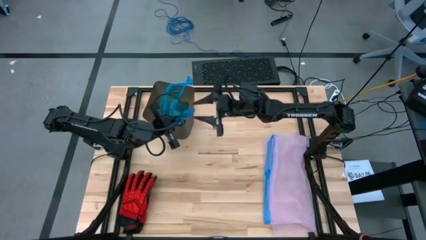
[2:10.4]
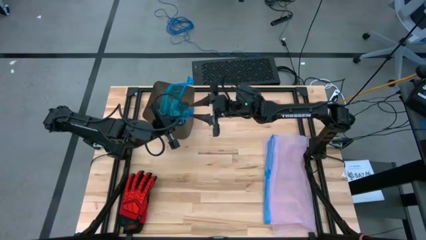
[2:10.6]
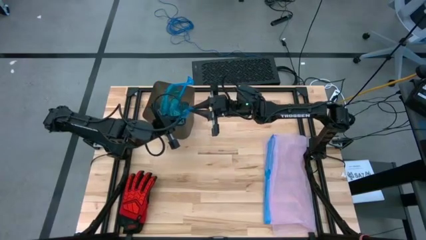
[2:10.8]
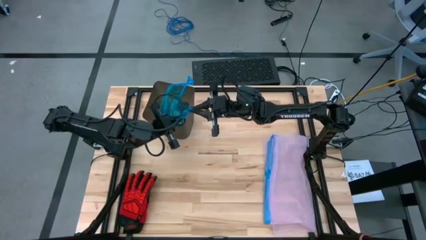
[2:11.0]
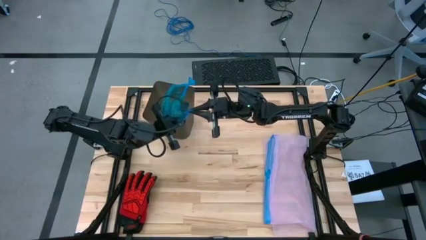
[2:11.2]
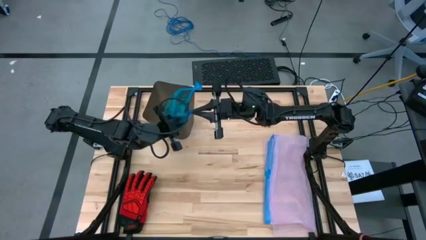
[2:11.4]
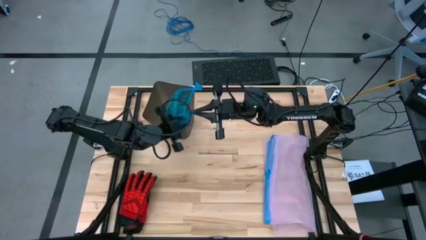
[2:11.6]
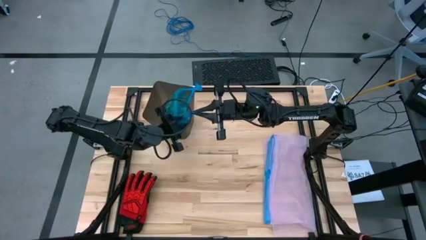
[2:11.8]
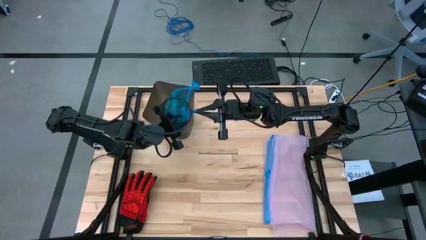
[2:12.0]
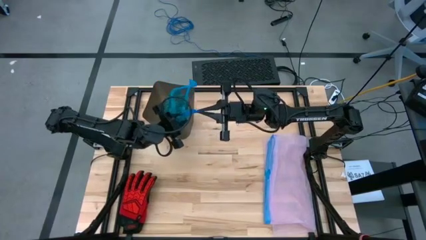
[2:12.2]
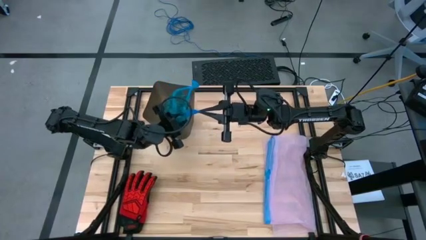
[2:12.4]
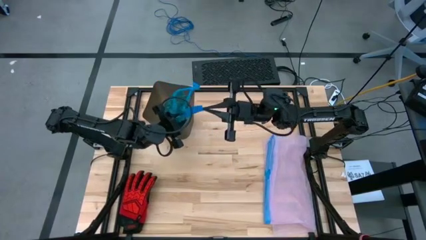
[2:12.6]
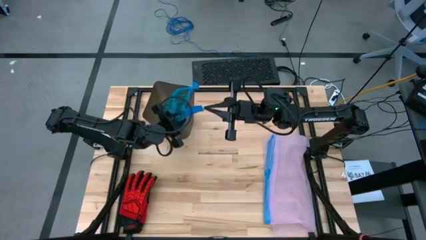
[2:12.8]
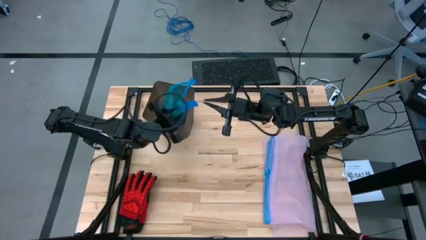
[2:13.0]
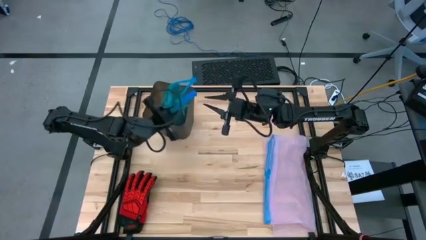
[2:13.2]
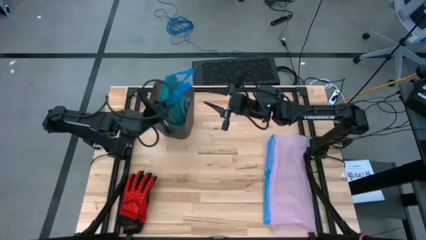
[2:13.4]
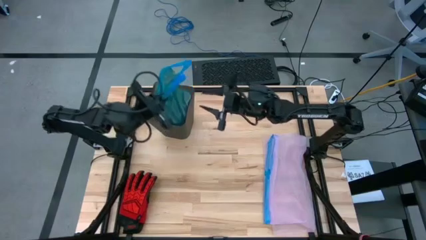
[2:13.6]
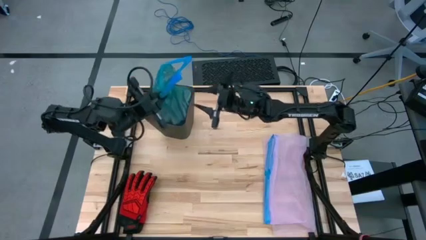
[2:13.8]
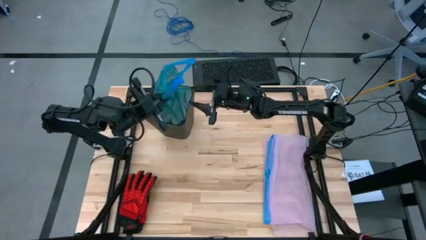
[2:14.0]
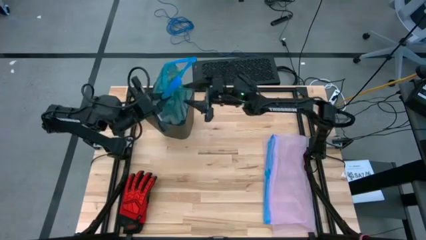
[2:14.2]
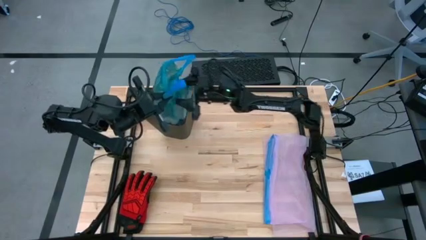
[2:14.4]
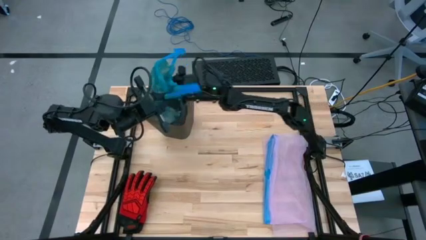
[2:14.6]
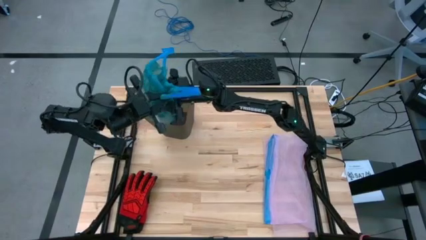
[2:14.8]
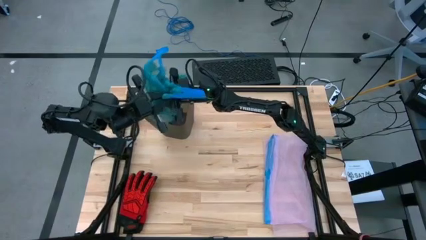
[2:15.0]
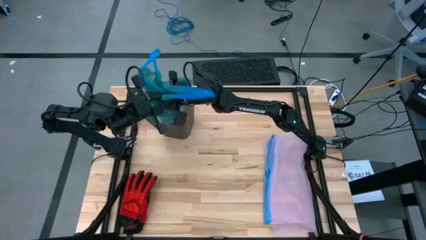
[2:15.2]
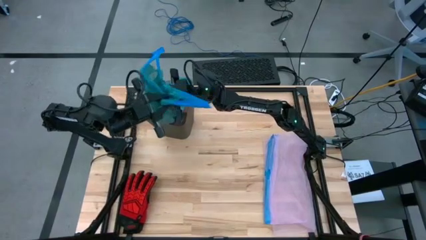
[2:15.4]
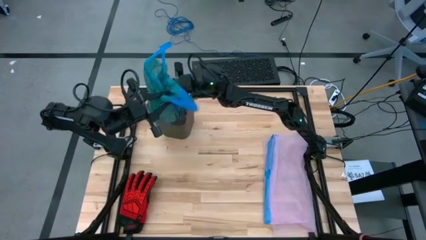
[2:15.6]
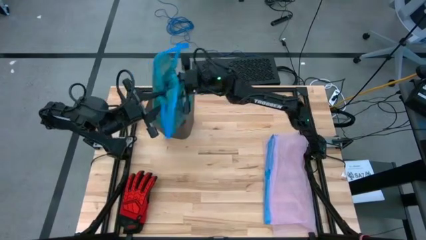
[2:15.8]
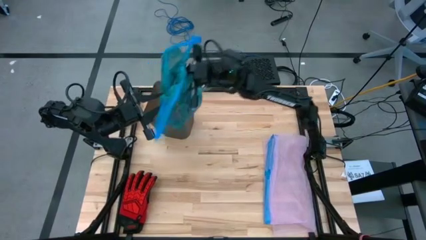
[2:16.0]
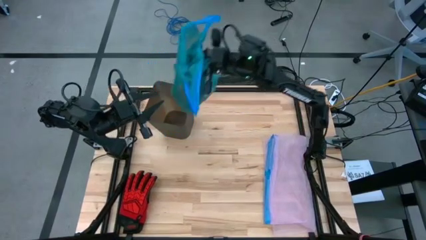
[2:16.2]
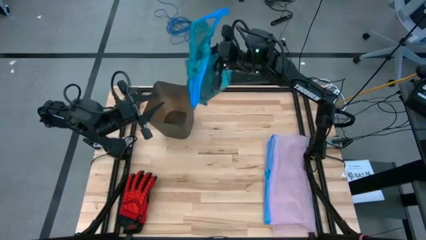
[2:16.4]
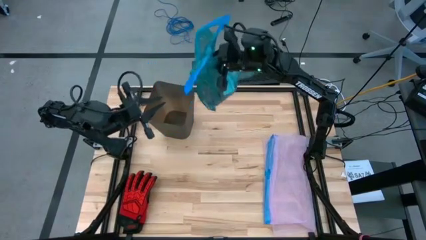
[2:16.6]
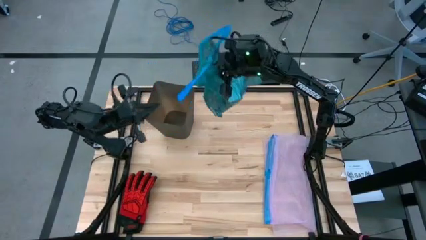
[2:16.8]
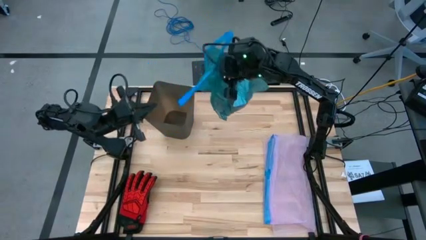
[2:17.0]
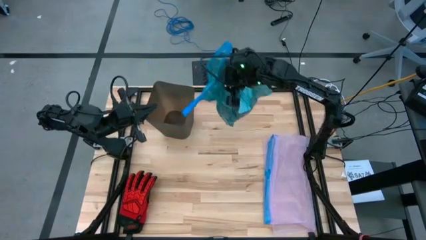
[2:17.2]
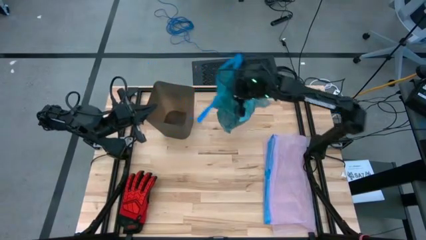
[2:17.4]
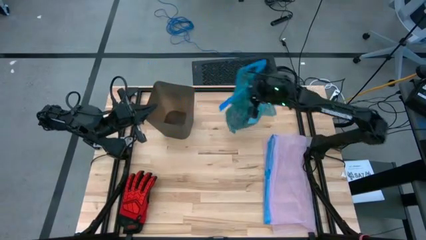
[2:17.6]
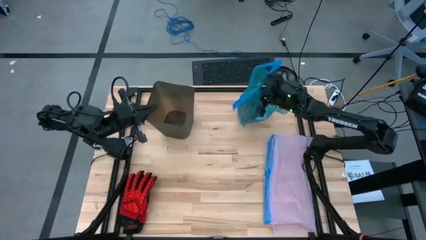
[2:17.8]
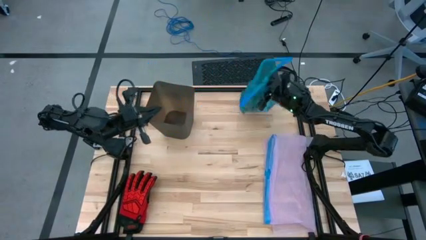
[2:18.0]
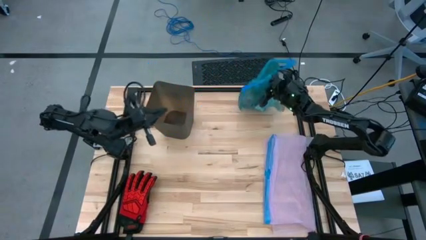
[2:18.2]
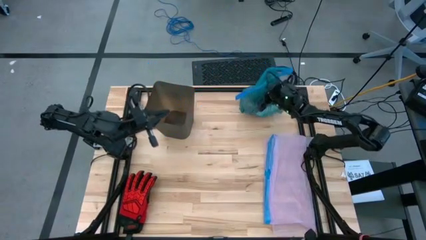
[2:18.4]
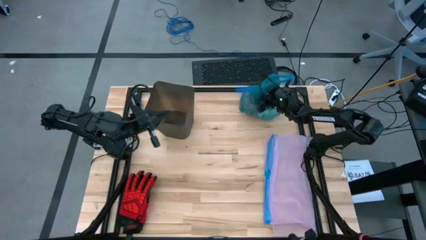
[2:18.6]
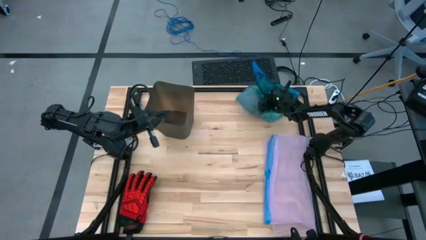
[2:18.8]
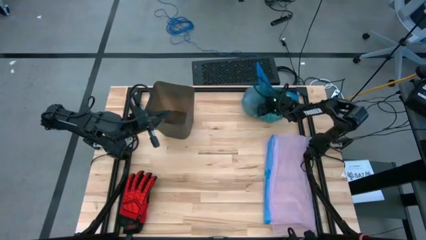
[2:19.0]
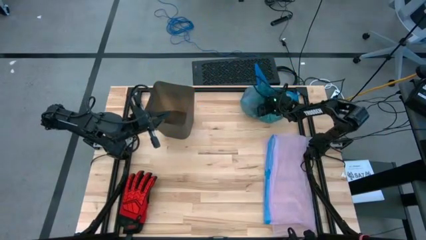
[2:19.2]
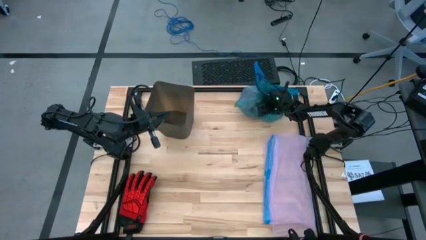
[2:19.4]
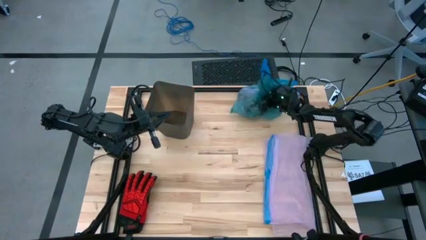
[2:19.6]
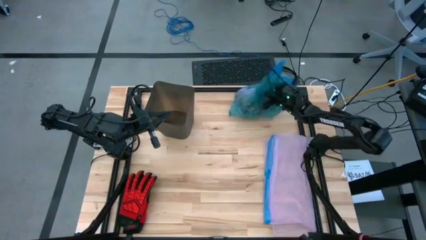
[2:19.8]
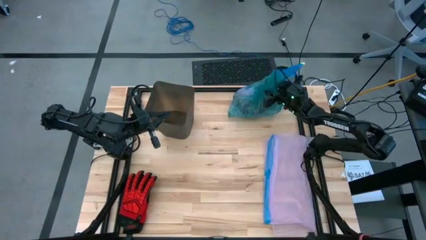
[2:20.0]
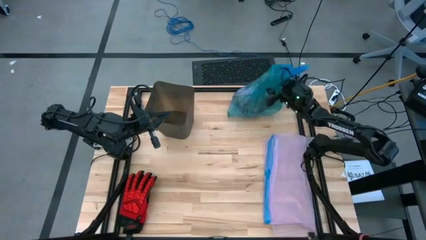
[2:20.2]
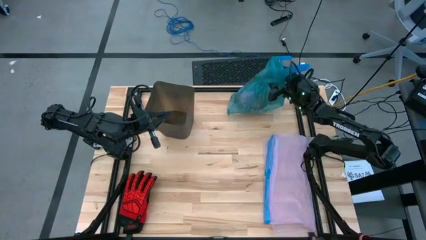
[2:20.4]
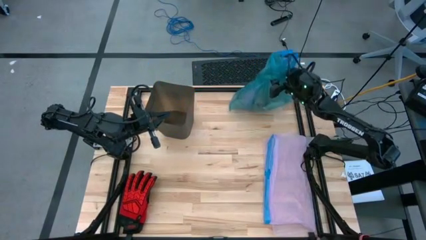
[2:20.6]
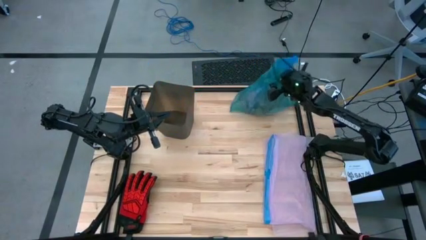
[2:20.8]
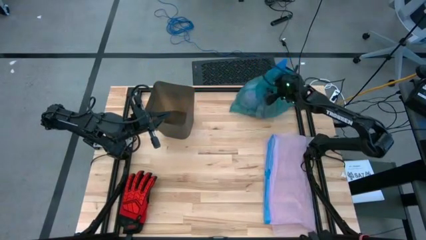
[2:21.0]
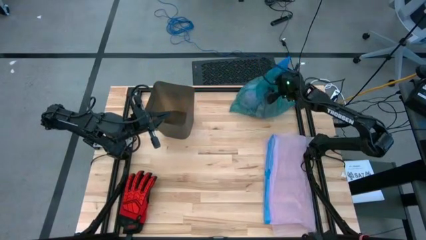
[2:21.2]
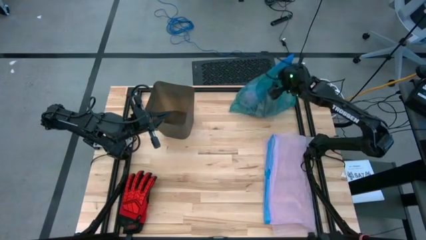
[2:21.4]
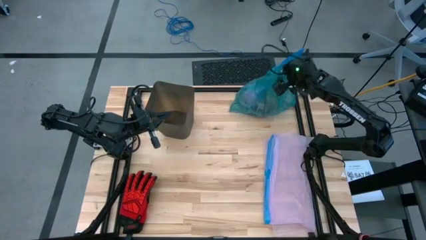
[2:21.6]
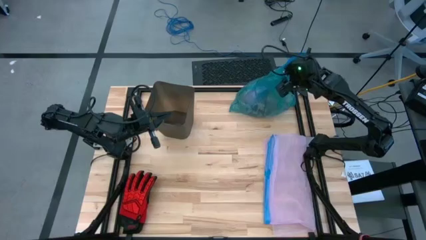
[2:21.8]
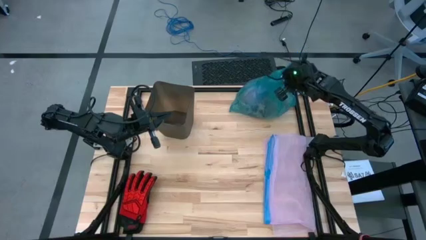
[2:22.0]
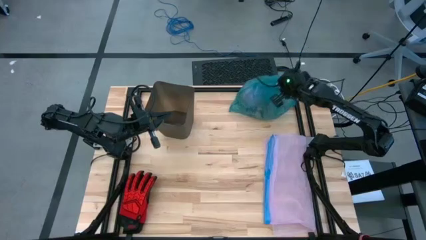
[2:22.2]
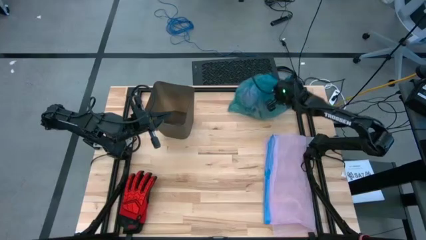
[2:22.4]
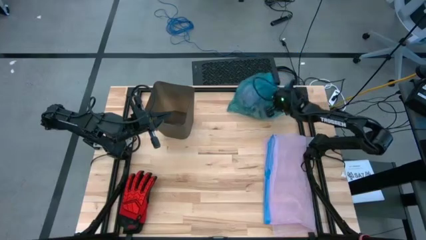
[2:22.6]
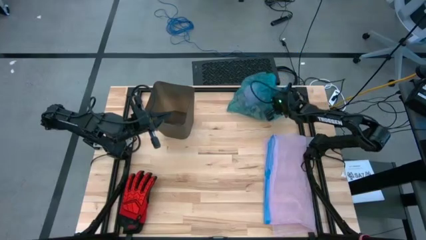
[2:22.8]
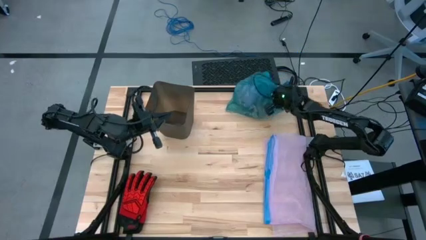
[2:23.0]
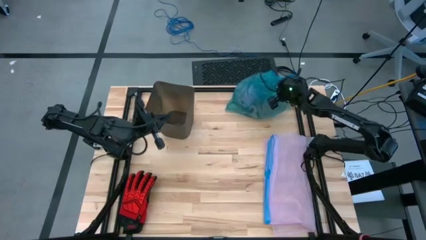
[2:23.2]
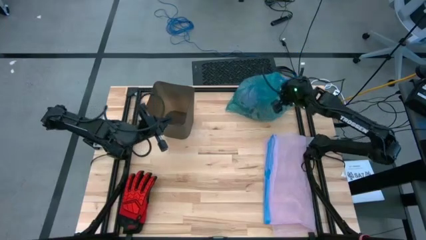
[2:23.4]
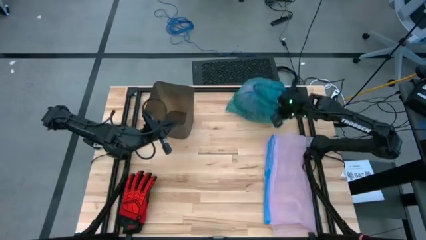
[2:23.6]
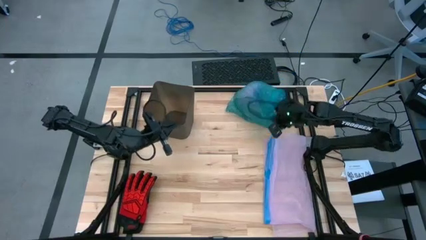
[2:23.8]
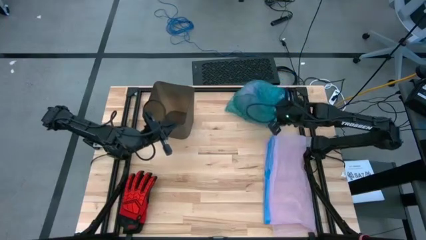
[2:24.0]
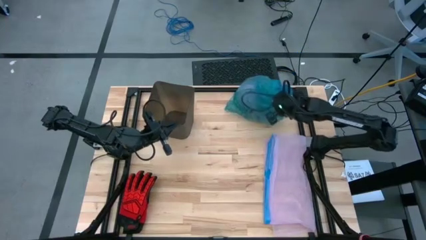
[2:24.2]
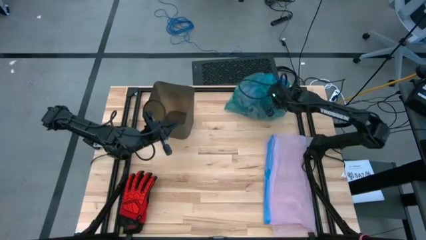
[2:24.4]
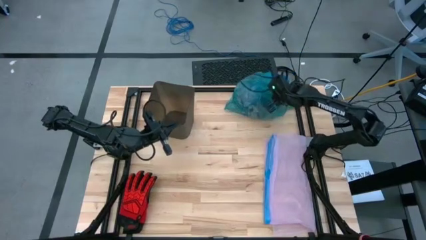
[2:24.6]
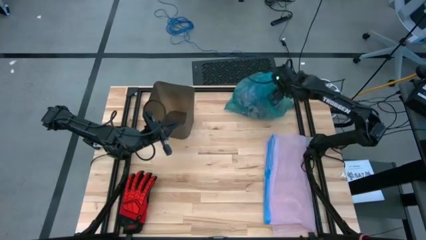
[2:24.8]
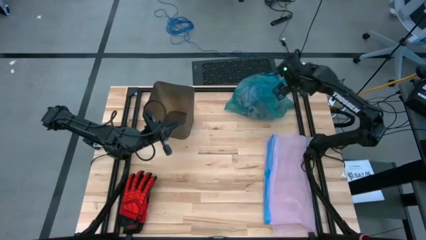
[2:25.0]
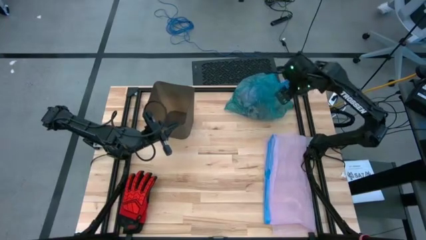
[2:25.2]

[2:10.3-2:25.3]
Task: place trash/remove bag and relplace
Remove the trash bag from the trash bin

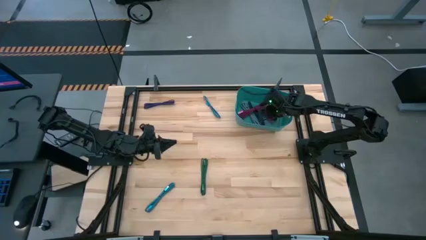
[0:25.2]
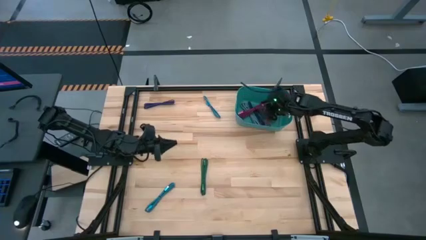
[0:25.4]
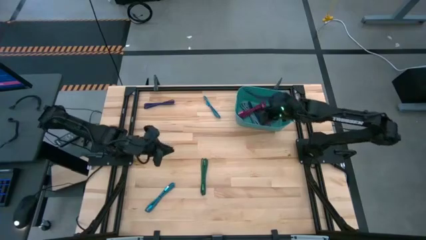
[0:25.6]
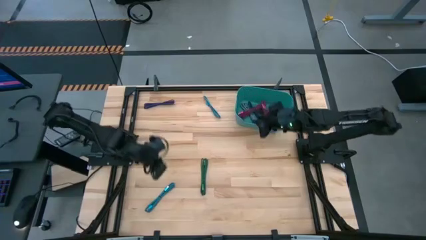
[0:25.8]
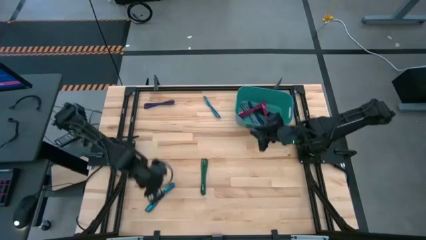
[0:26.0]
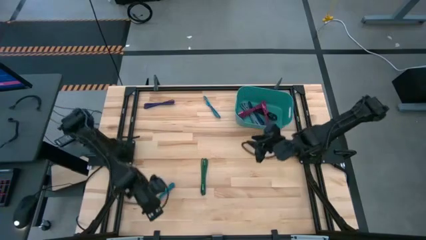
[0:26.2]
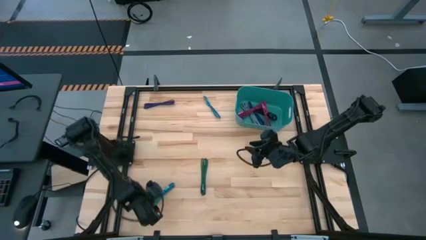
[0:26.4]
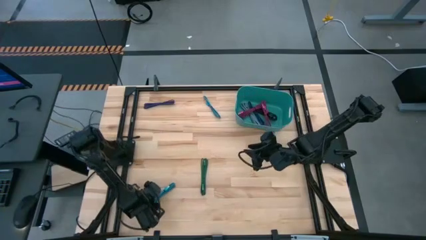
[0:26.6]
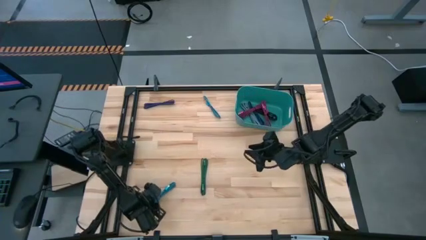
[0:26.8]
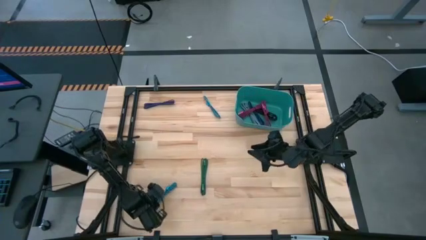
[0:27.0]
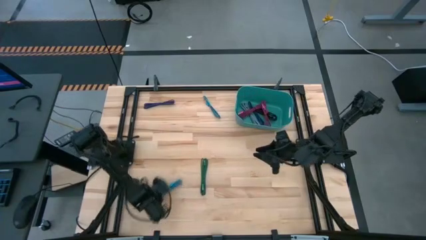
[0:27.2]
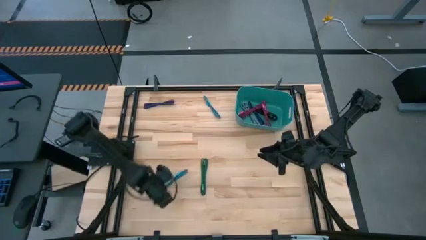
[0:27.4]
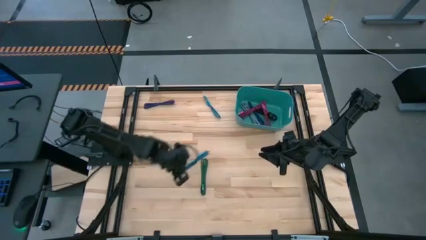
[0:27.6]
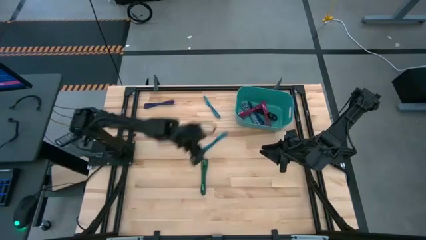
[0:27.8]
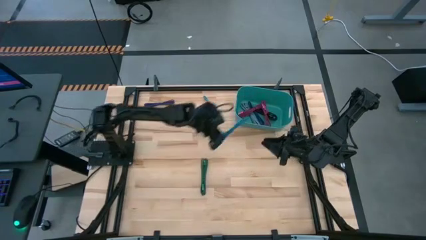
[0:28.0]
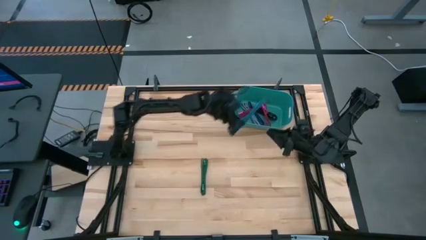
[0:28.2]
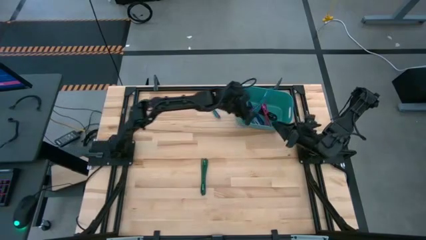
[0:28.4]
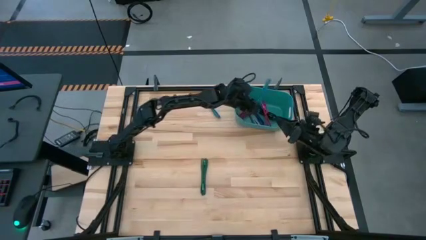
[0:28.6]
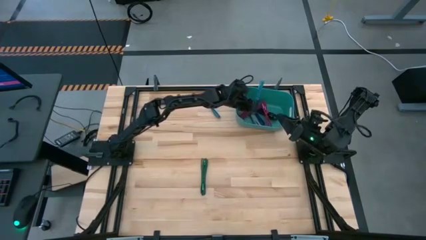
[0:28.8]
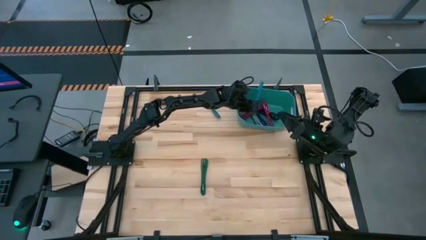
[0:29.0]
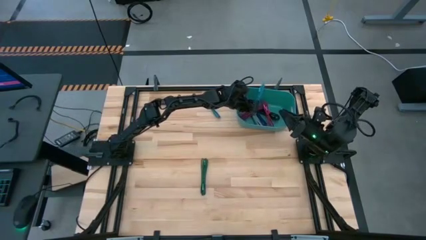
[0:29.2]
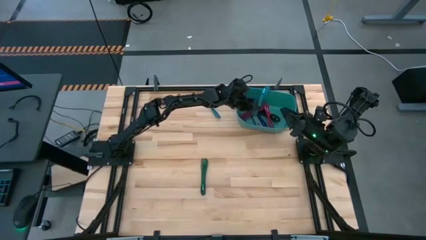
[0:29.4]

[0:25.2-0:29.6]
Task: Pick and place USB-C Cables
Put the bottom blue charger cable into the light blue bin
